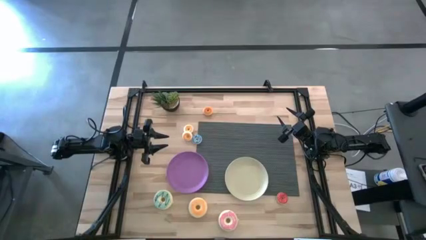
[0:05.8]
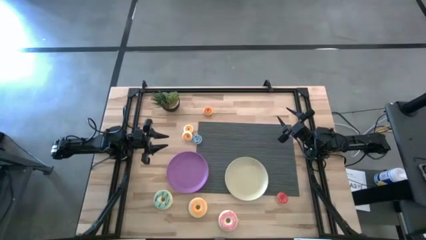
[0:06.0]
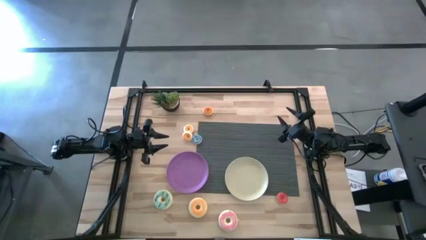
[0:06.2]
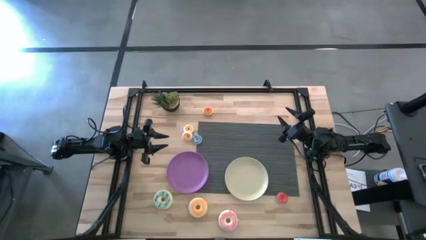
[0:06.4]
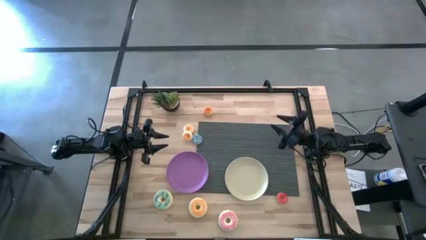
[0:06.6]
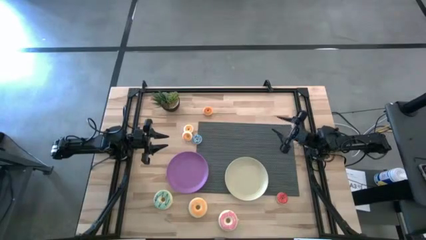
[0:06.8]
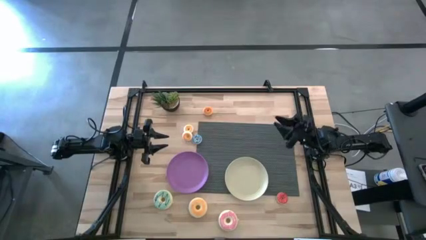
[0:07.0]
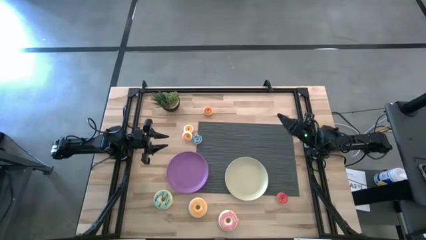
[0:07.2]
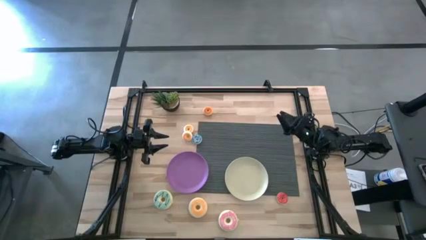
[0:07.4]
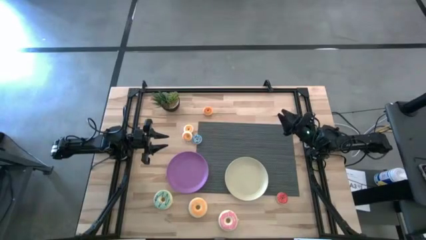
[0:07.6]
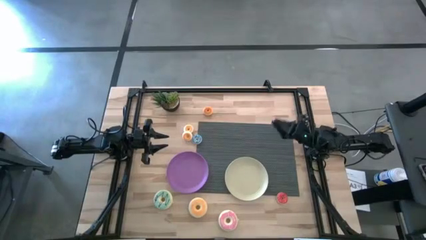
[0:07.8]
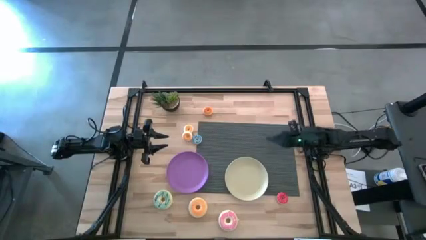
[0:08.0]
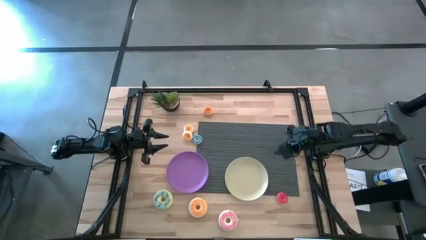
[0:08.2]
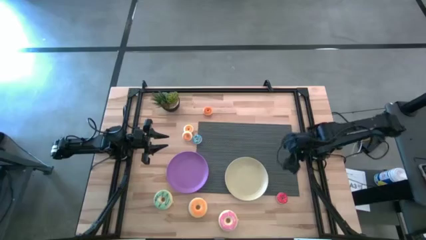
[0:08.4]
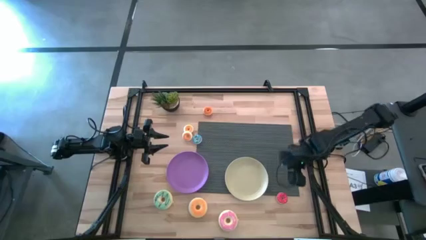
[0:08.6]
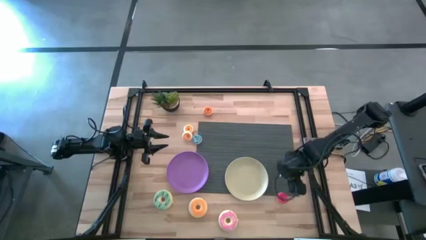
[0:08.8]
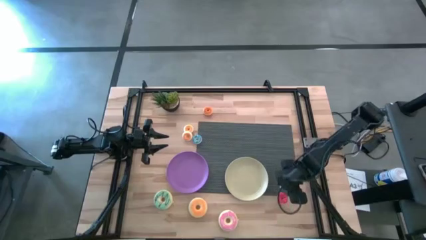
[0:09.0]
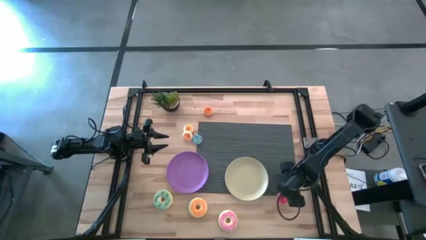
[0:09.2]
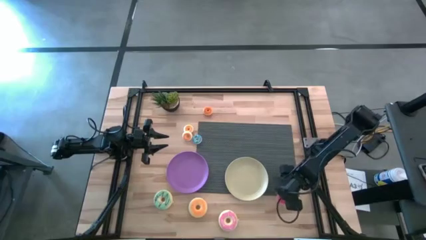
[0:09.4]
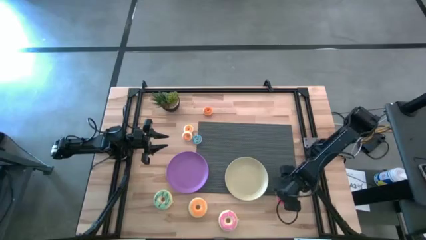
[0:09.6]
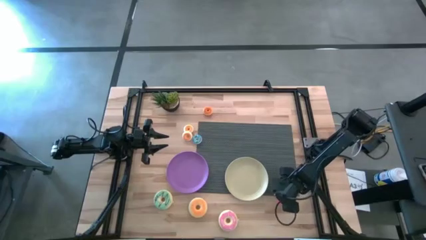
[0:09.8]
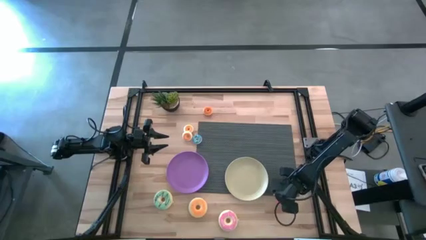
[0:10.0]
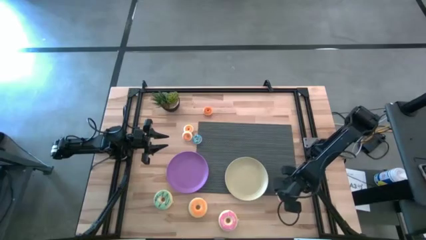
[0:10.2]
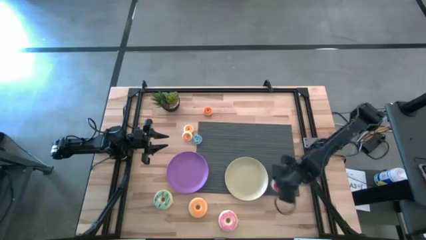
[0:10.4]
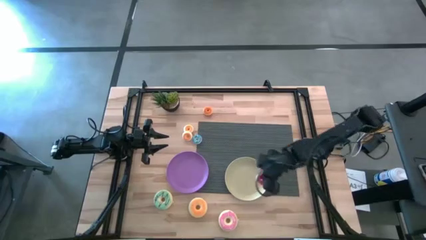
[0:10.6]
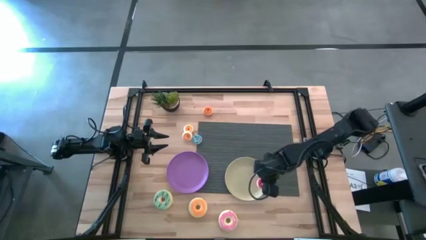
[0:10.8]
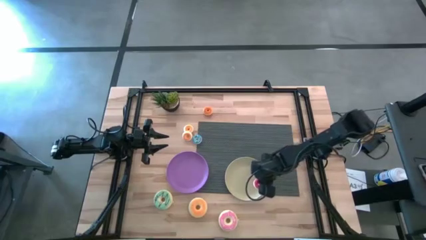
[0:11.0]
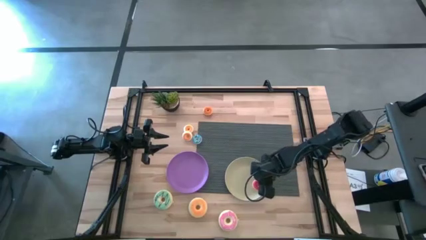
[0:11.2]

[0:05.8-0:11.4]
Task: Pick & Place donuts
Put the small red donut on the white plate

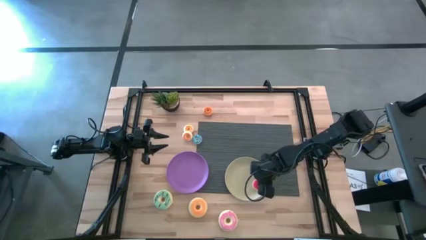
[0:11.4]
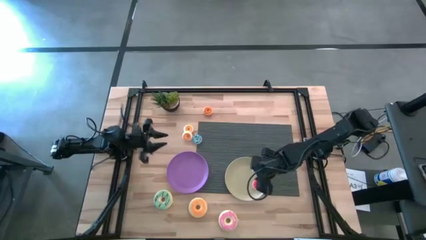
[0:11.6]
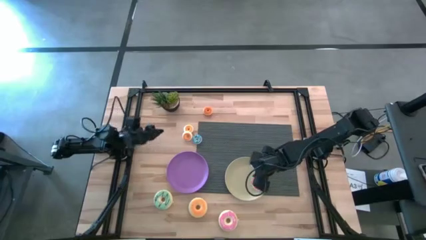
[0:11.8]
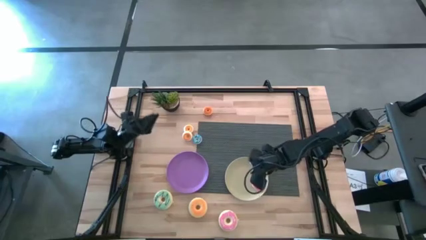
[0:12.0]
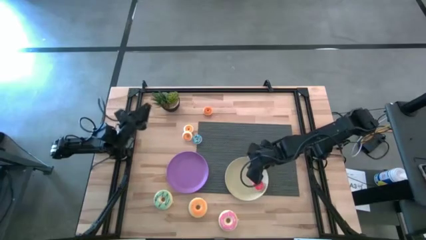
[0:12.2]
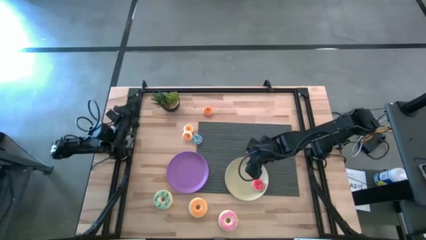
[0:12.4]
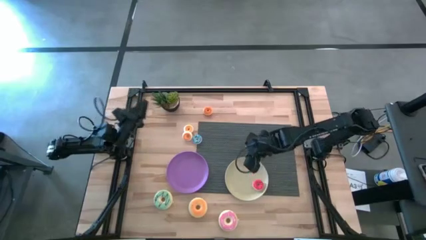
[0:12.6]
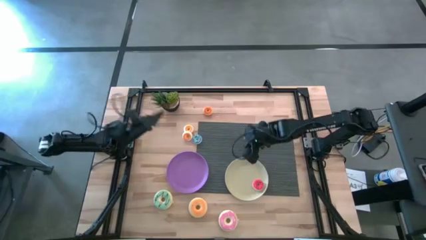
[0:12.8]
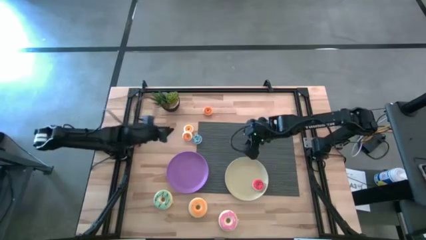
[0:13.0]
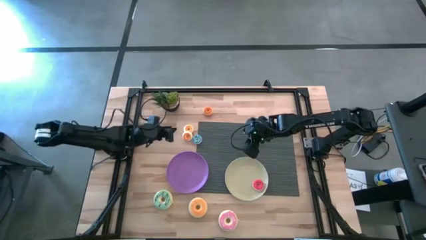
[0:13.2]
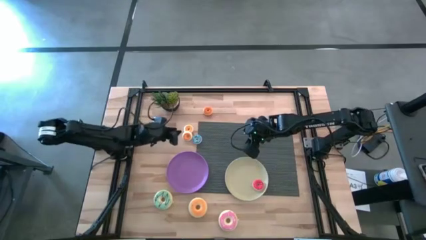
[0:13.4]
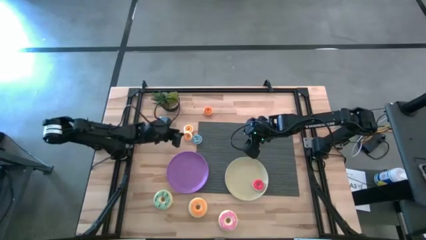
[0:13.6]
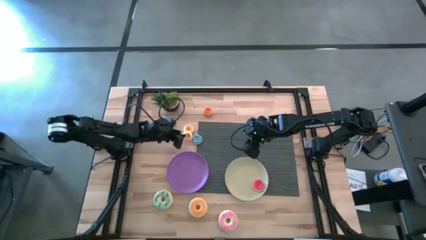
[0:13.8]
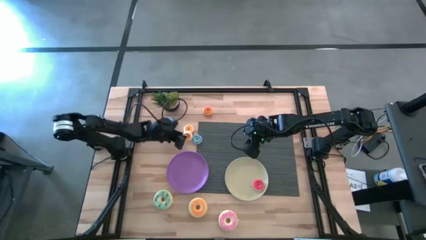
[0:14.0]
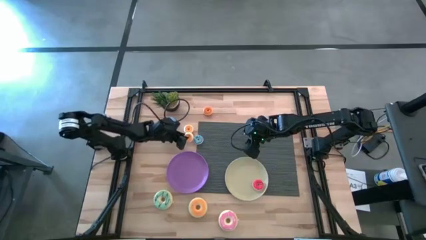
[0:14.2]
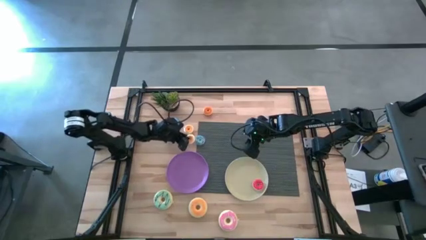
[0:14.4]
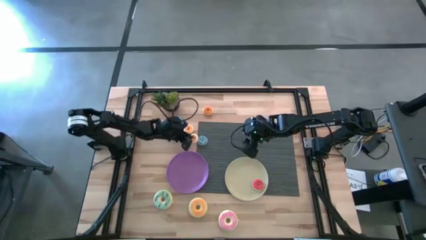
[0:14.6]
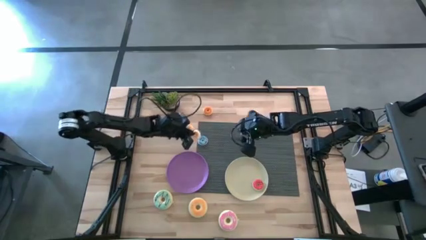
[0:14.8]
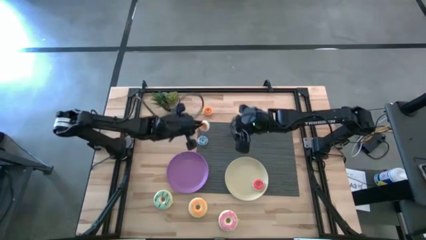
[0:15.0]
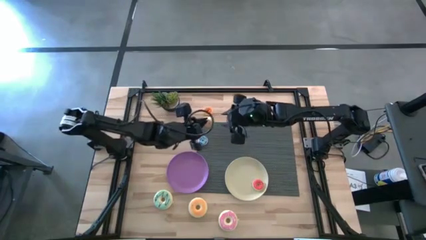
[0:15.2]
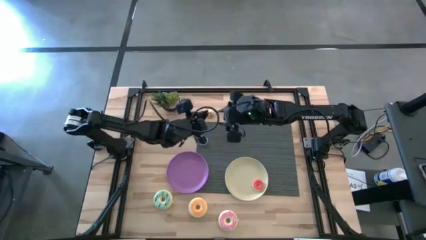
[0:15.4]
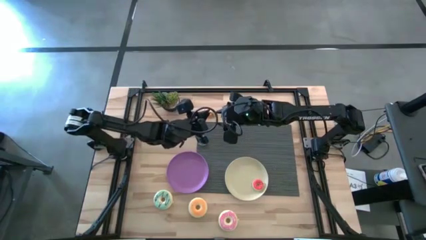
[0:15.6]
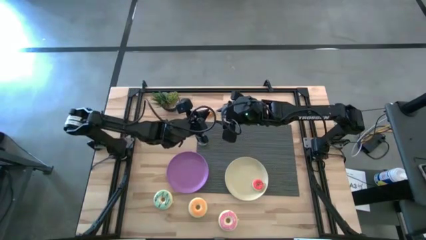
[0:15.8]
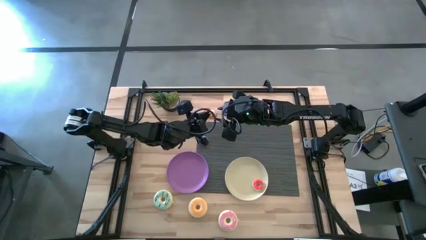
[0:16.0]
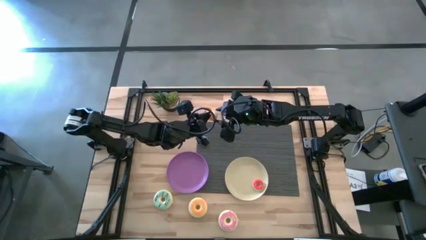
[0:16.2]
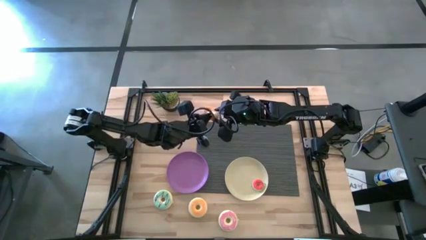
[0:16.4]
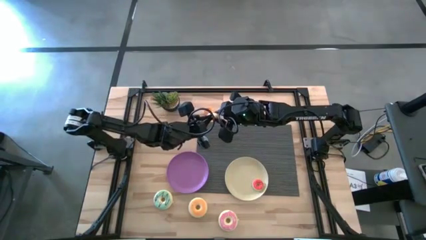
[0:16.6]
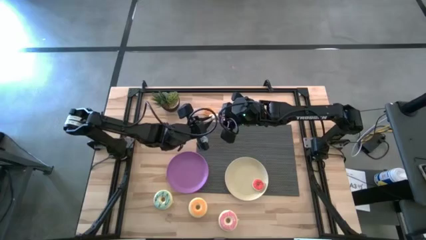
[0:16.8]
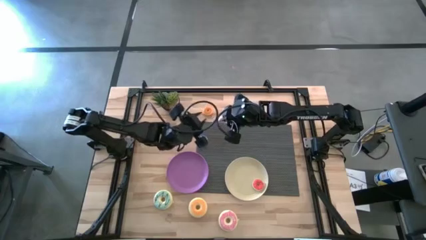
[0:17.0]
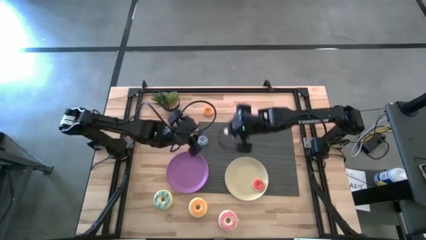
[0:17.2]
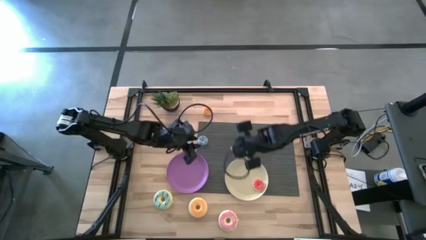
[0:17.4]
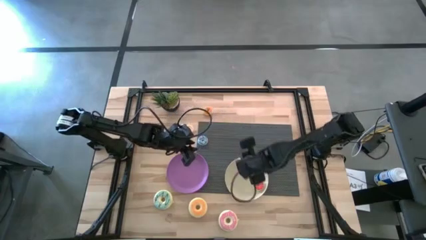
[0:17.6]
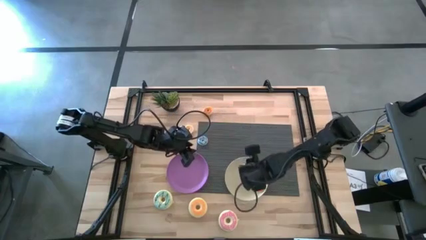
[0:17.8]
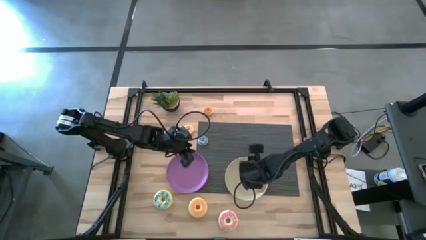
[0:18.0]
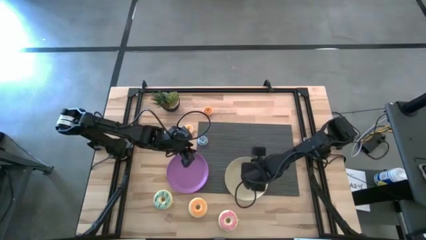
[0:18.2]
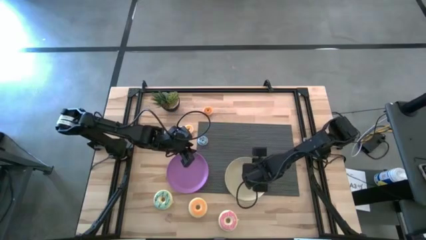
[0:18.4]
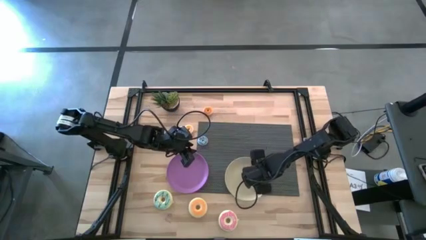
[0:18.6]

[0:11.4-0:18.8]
Put the small orange donut on the white plate

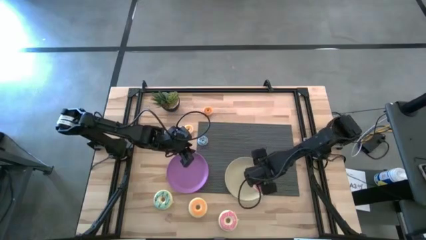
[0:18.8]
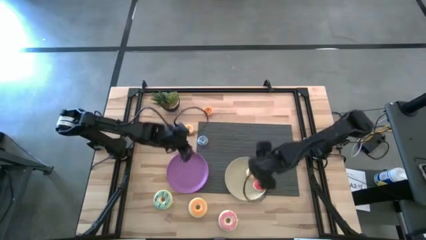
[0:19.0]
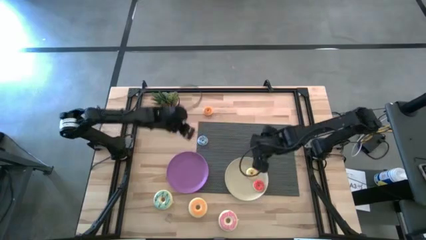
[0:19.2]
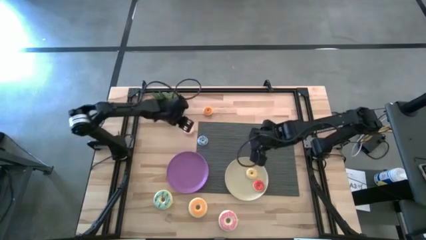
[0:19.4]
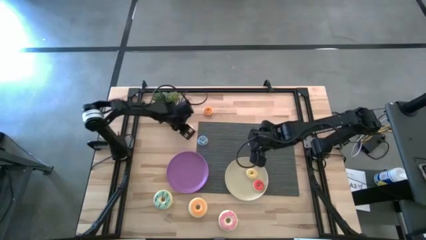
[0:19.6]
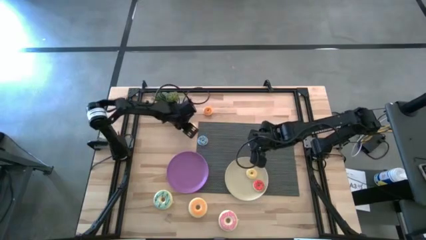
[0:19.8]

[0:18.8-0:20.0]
Put the small orange donut on the white plate

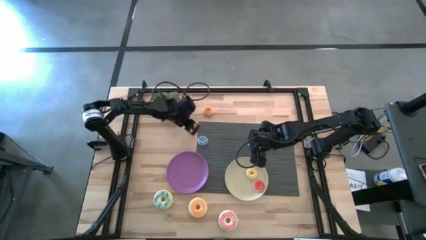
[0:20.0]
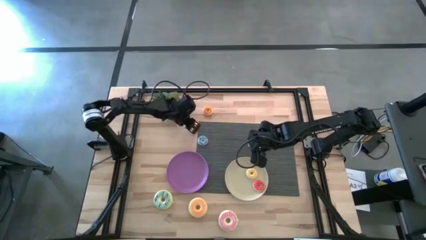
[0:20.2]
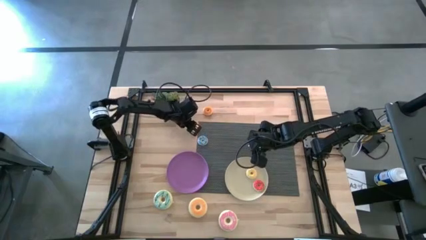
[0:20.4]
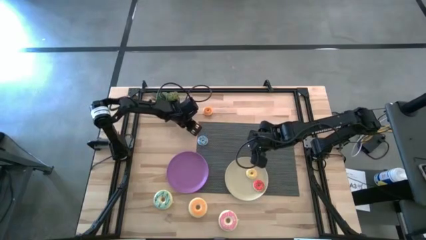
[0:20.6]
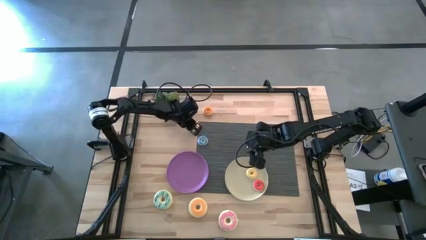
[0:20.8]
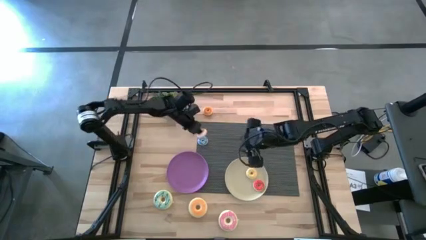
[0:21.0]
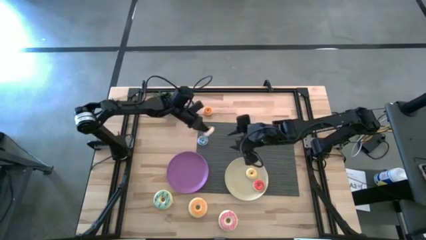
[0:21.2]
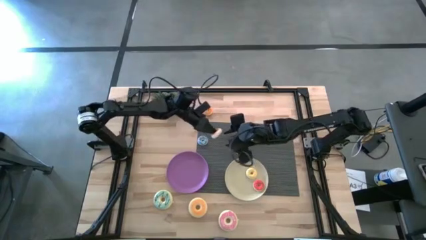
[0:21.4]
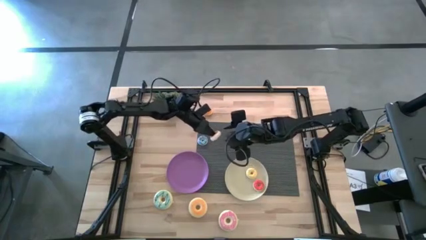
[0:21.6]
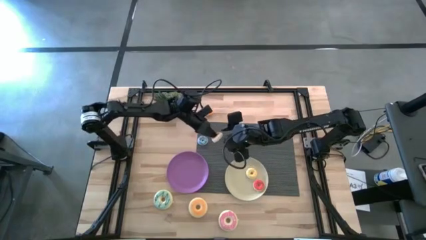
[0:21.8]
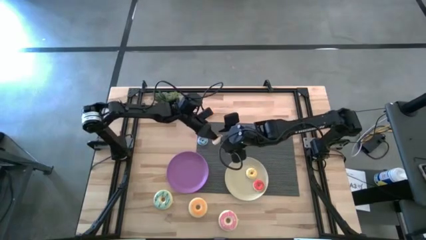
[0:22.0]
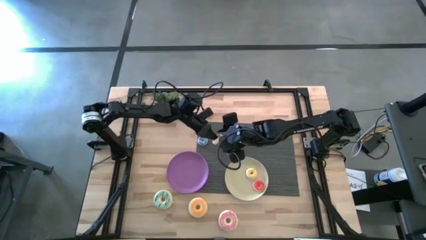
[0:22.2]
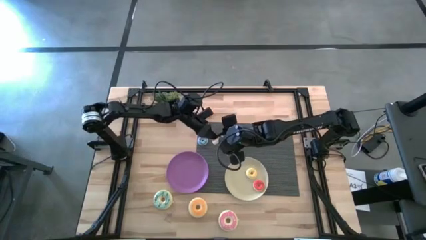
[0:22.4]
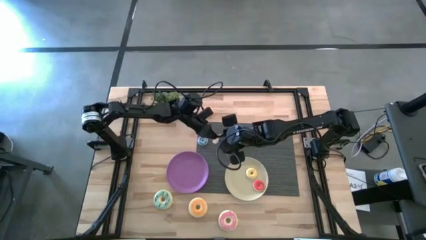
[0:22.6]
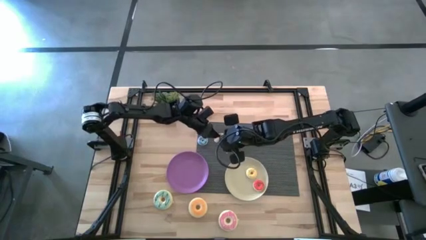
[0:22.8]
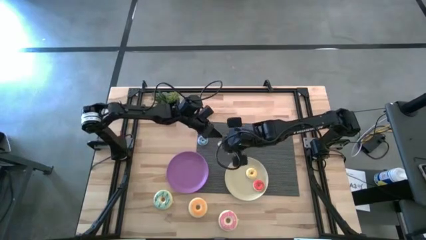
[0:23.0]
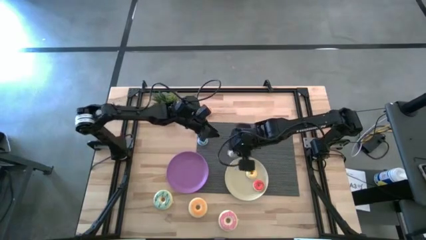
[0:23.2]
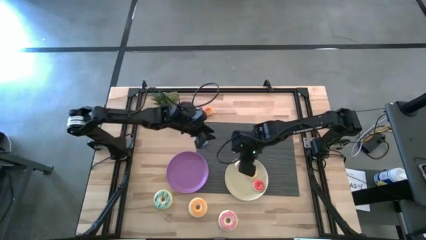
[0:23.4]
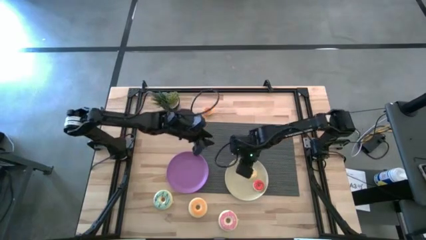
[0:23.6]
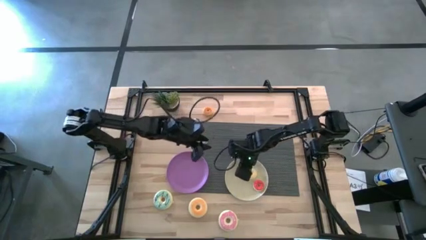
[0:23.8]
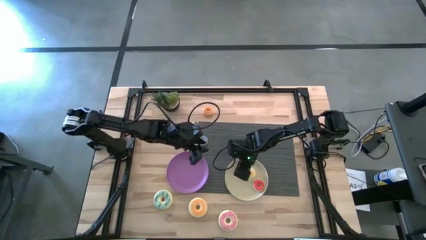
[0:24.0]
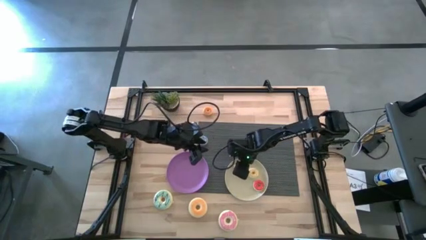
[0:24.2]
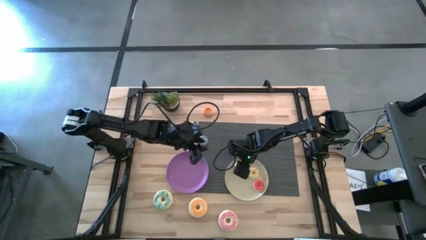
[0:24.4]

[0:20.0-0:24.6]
Put the small orange donut on the white plate
